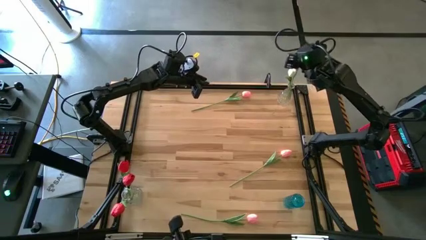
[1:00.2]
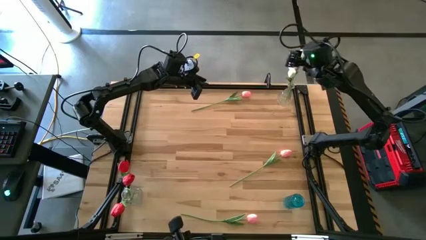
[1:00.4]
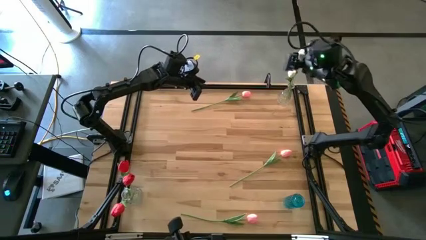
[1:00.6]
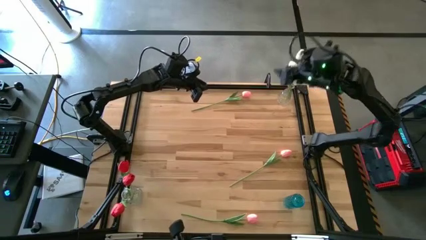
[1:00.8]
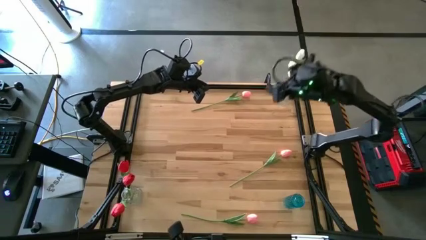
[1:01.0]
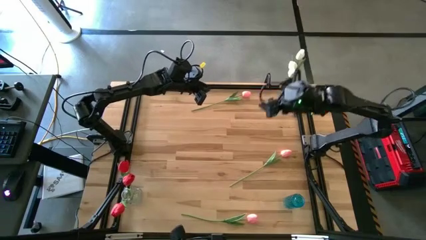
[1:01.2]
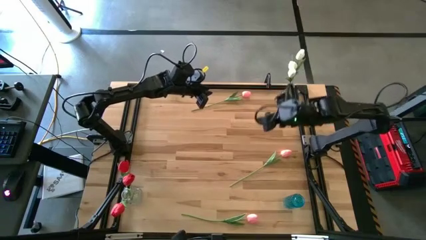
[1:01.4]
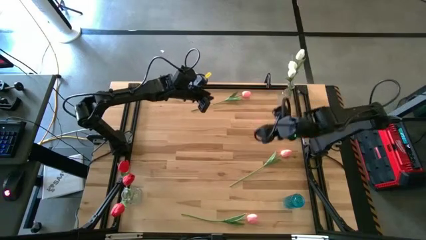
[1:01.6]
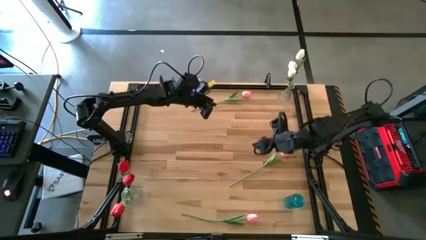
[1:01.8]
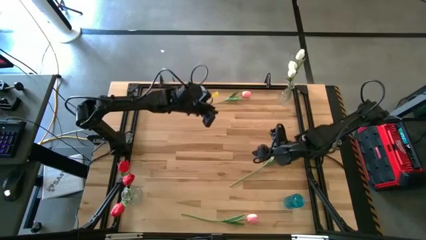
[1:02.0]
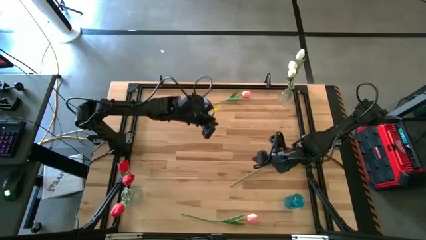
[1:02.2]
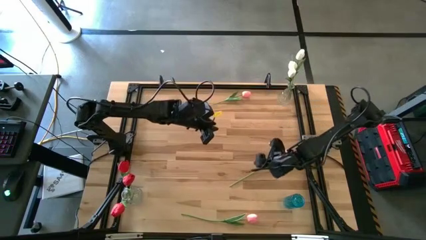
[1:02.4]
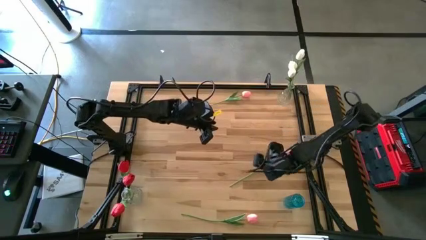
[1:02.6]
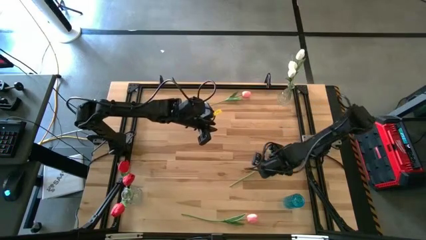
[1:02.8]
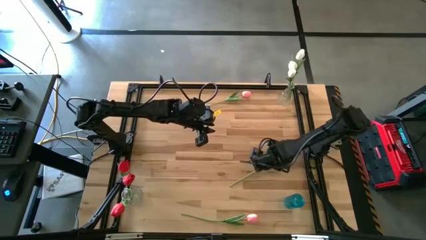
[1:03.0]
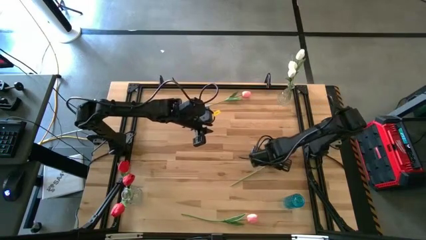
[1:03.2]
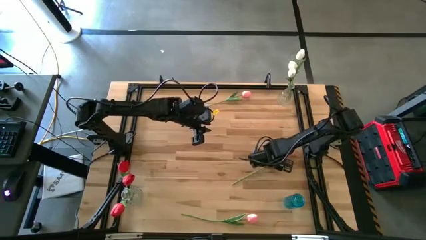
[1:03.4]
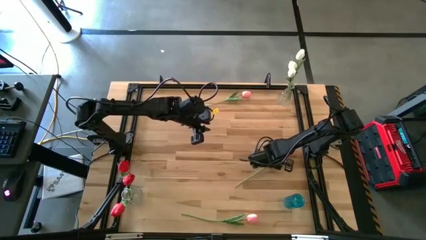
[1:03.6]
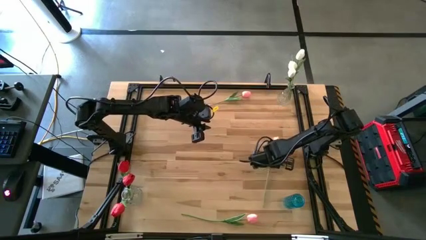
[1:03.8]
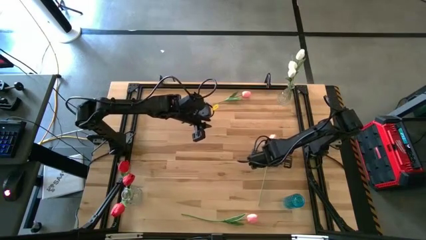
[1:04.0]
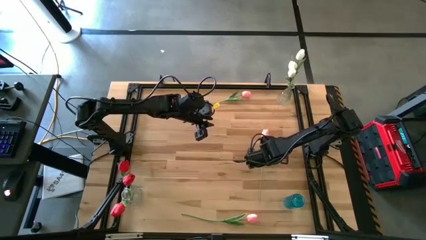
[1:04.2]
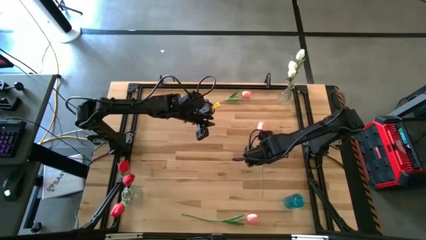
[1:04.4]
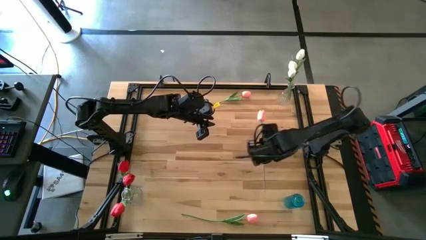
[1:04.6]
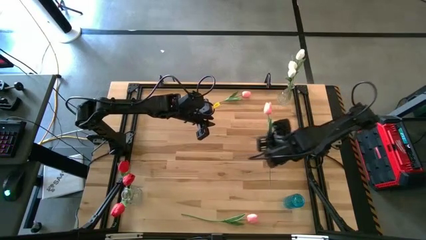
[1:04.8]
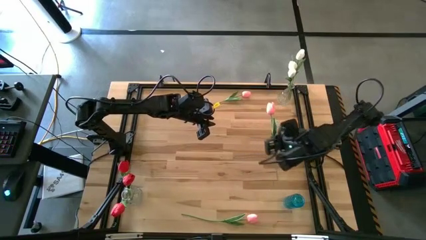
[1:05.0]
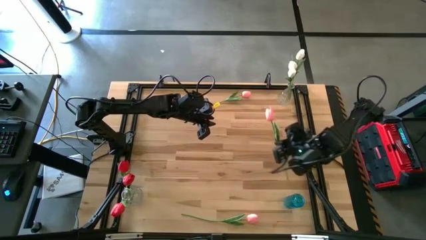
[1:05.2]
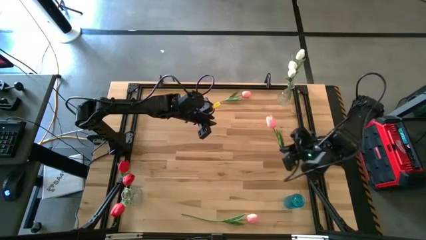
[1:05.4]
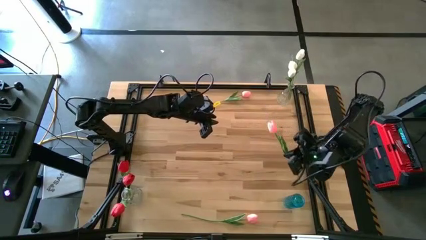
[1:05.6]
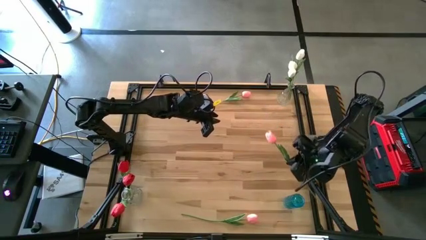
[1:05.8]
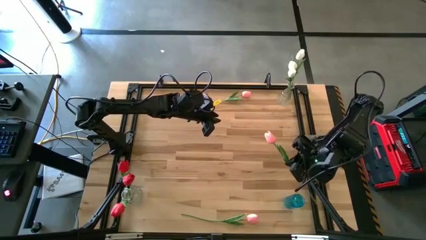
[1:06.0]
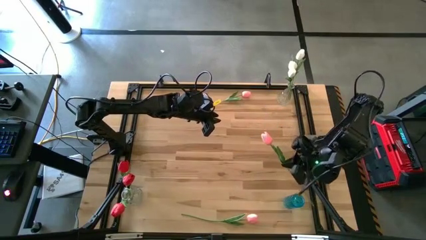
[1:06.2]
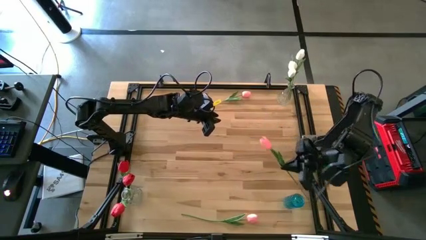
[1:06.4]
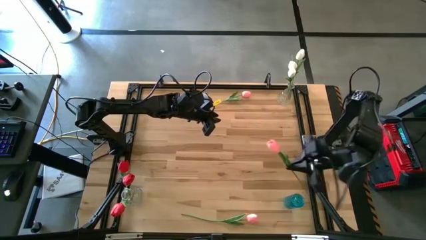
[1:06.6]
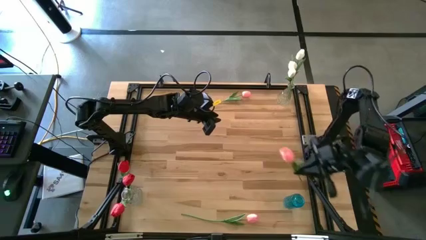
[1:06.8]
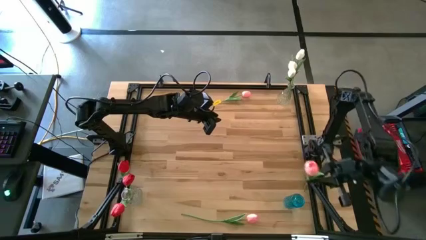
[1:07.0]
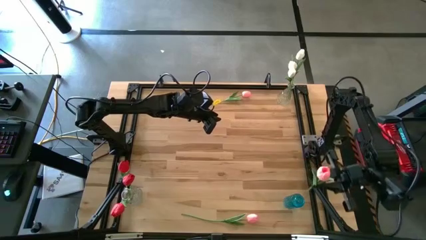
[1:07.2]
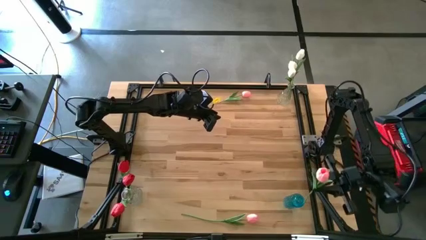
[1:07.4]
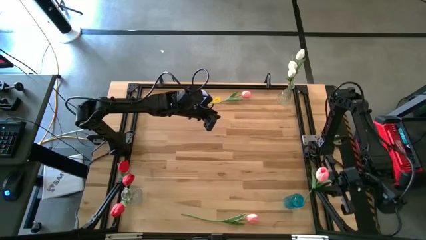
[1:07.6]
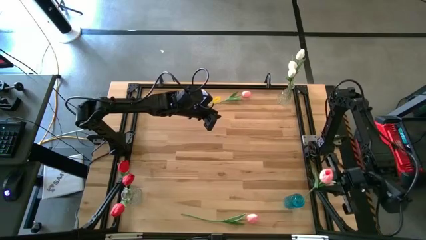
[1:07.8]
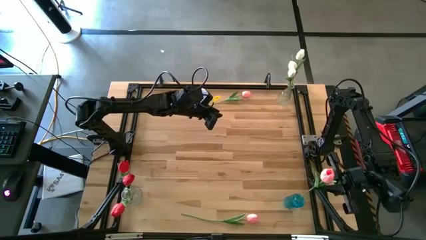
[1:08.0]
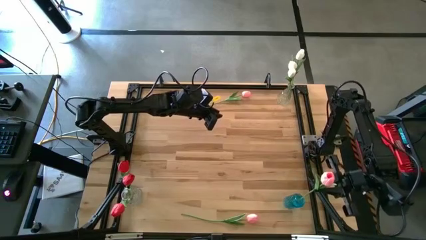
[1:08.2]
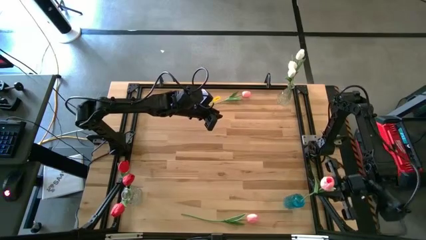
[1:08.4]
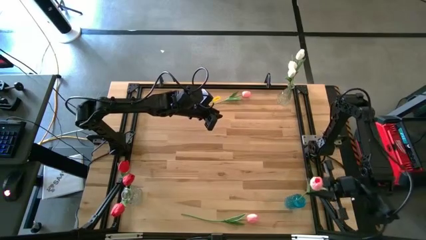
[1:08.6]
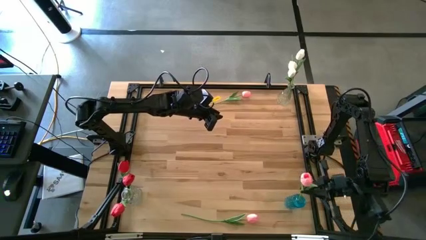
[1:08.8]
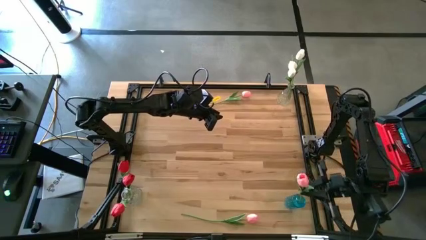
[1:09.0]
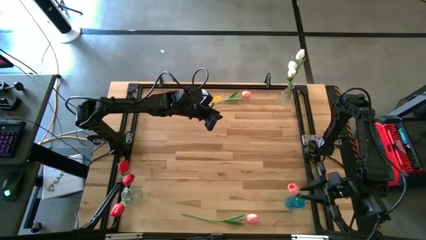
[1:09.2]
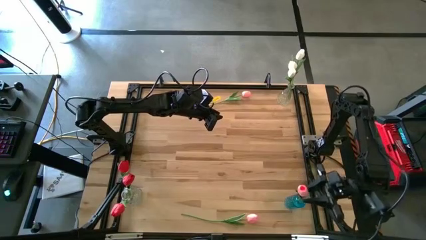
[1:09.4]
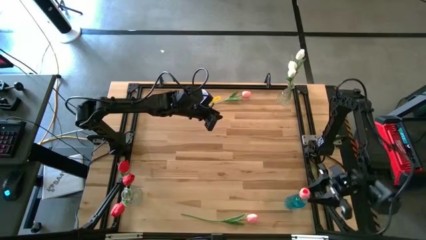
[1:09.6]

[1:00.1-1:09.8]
Task: Sort flowers into vase by color
Put the middle pink tulip into the blue vase

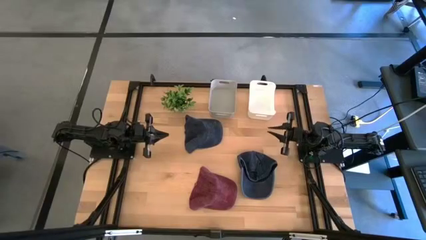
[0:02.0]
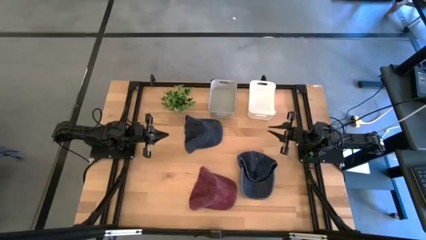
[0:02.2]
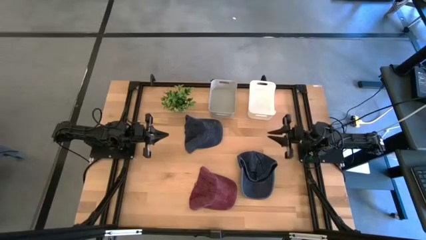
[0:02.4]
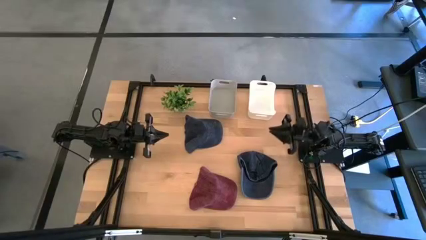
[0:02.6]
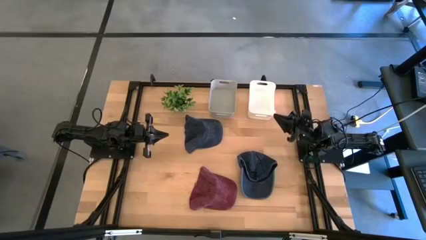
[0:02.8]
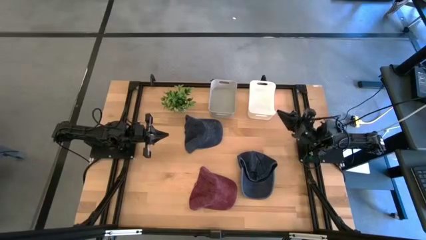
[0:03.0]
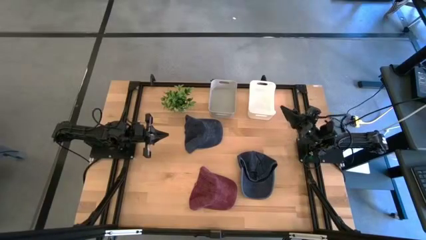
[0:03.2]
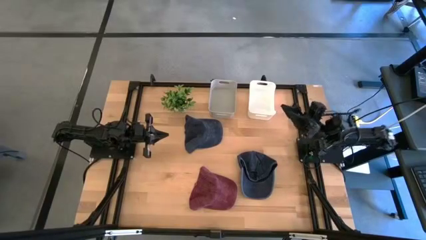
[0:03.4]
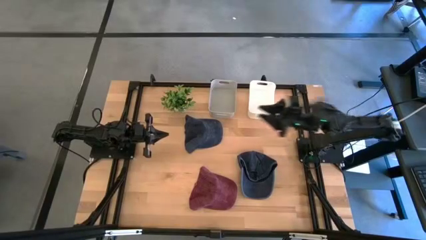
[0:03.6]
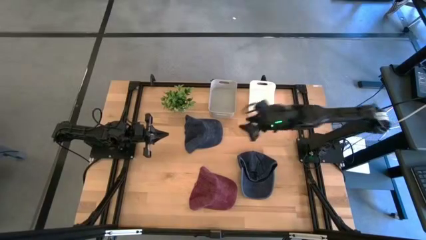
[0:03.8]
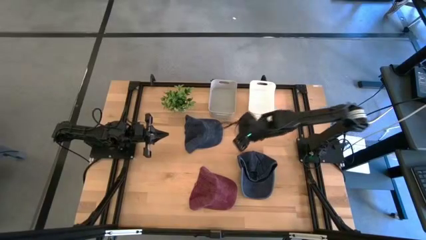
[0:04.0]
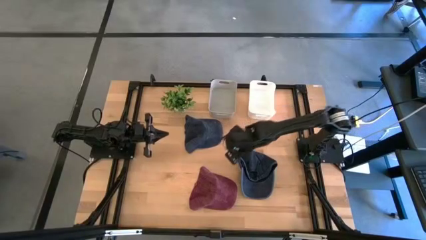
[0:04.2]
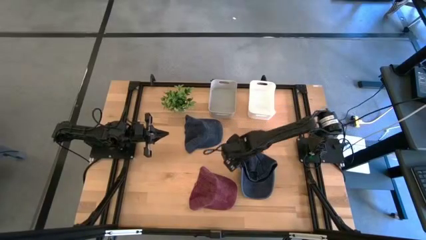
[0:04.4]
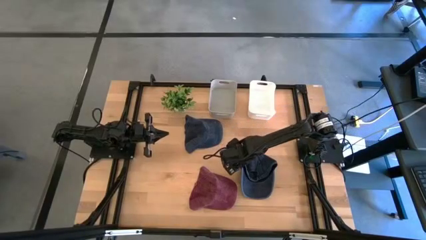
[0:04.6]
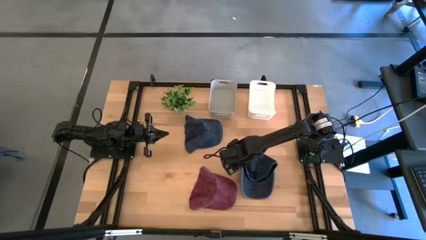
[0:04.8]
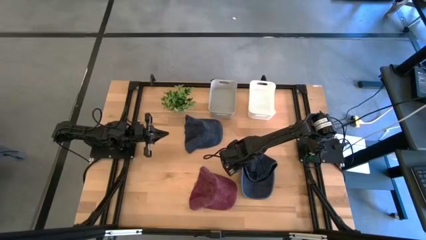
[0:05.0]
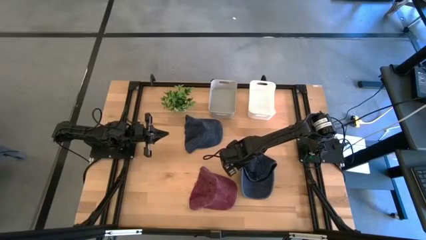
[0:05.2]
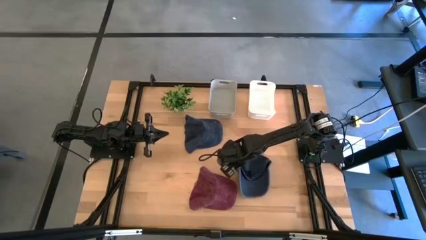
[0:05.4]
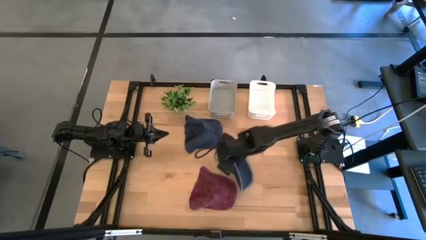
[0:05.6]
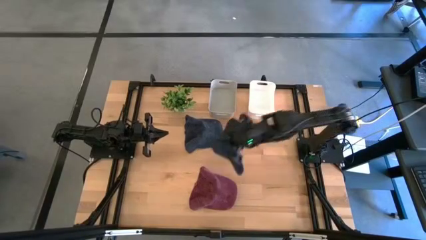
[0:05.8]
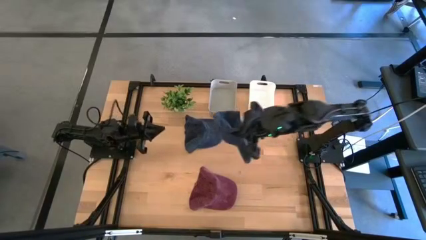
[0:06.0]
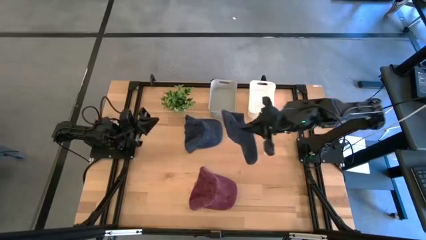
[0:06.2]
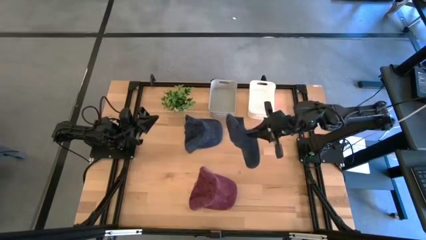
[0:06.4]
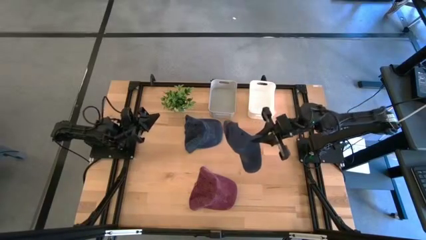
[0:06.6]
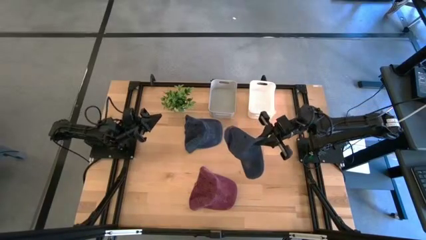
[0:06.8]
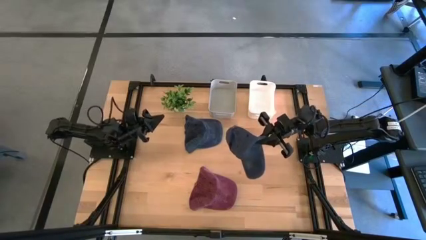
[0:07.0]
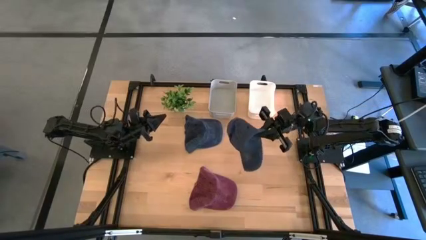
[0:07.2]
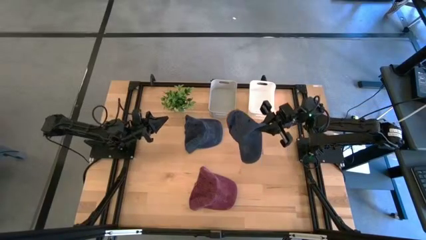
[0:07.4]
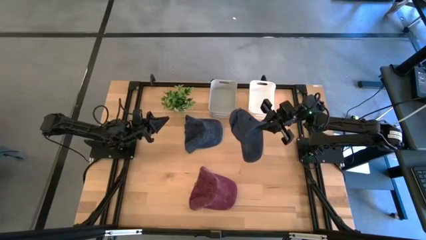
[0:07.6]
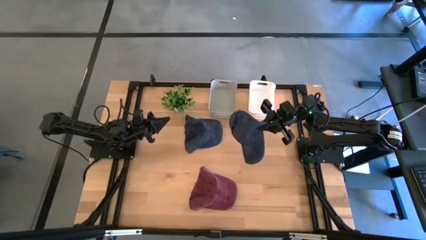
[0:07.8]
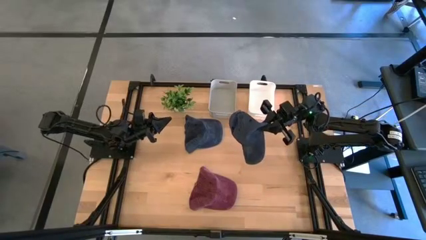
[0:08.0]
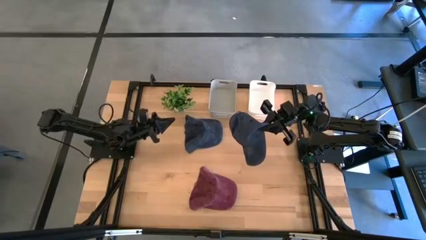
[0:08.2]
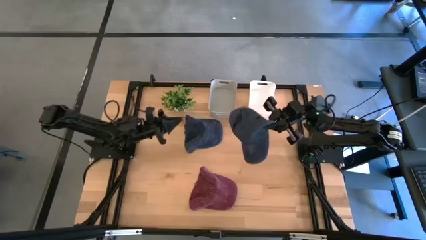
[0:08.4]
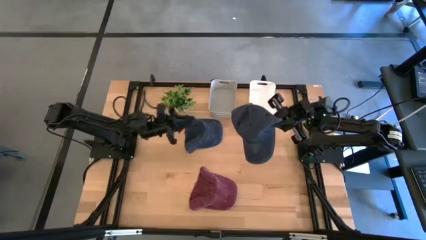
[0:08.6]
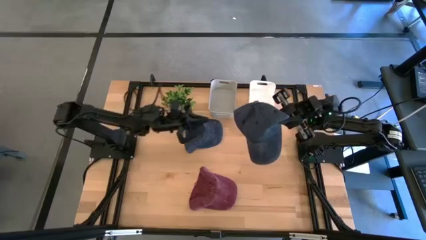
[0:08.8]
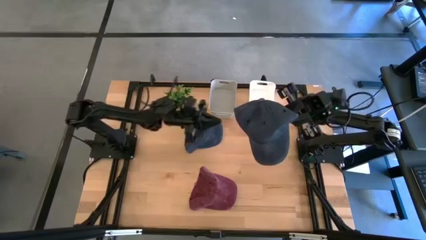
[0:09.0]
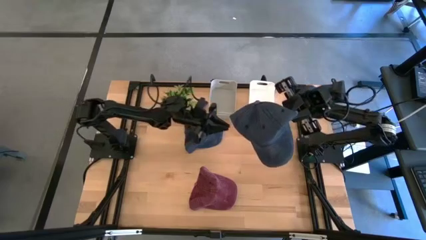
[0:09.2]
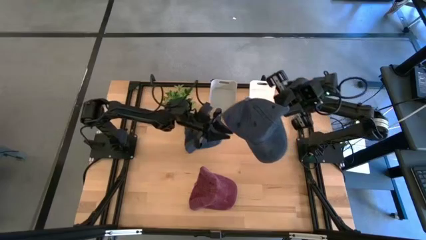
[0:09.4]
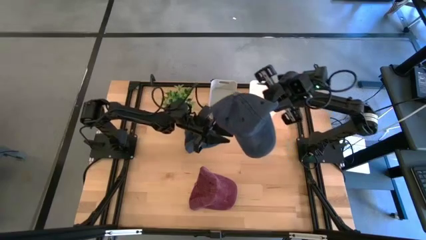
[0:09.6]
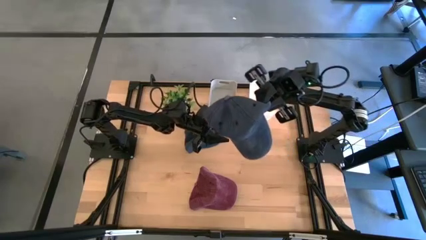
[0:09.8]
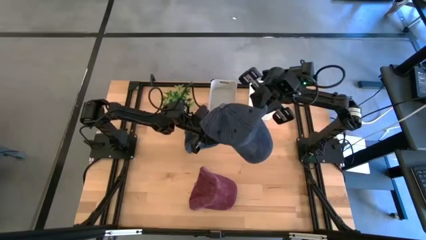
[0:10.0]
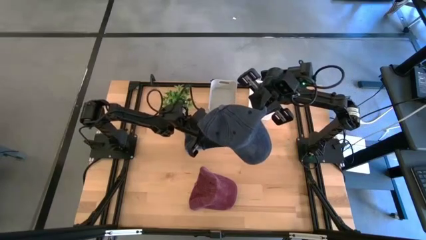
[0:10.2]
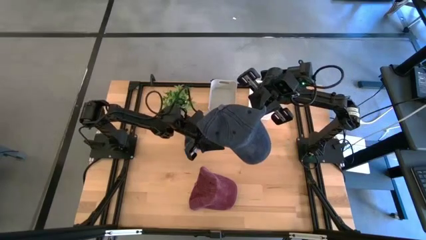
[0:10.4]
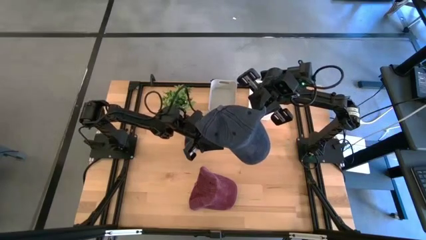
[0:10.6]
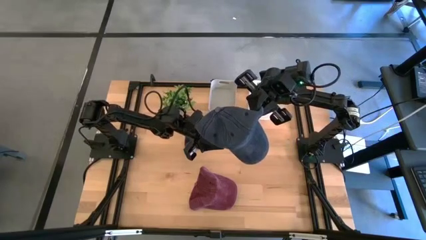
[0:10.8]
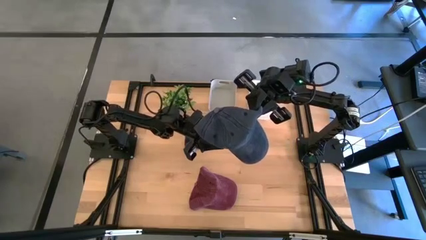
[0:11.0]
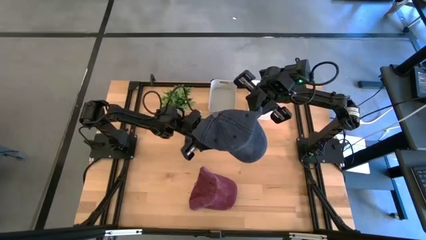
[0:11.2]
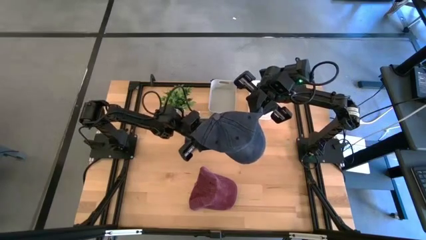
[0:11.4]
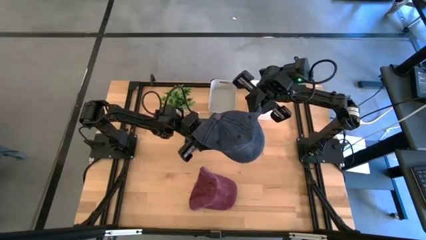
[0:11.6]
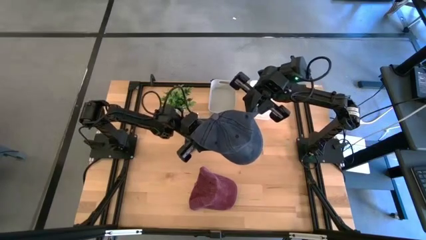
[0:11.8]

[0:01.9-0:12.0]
Task: Pick & Place hat
Put the right blue cap into the white bin
